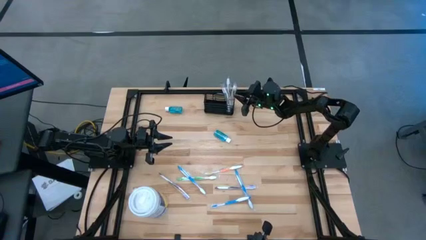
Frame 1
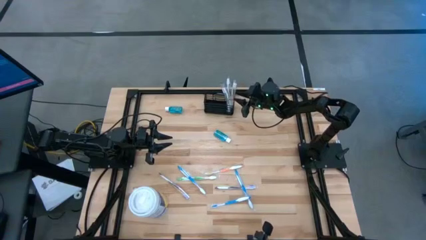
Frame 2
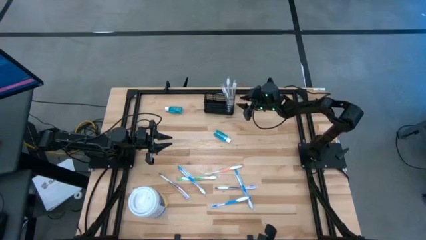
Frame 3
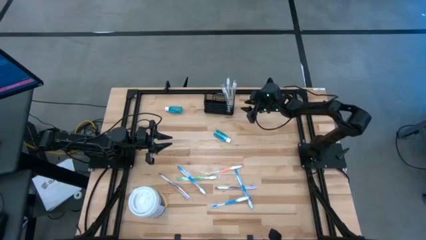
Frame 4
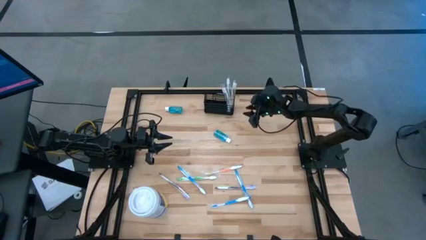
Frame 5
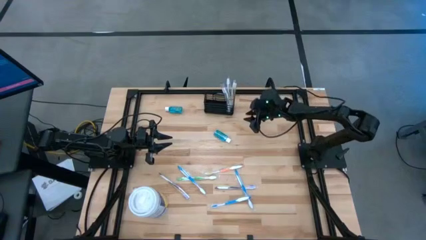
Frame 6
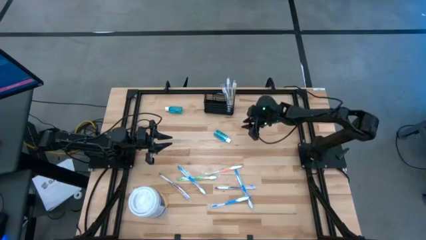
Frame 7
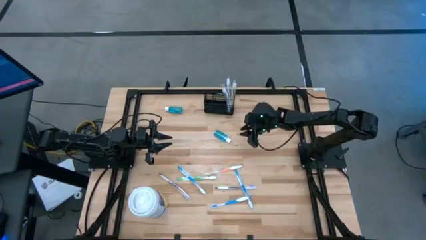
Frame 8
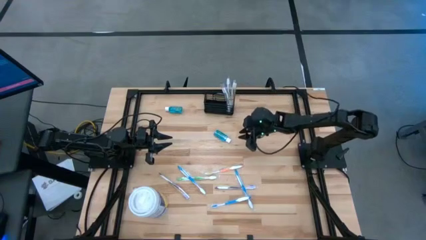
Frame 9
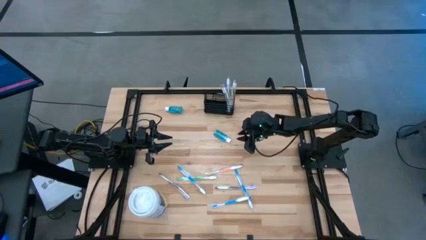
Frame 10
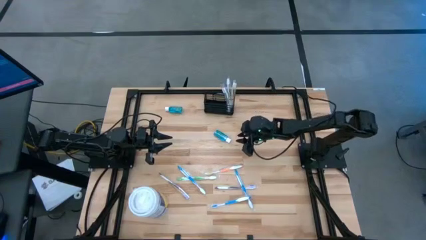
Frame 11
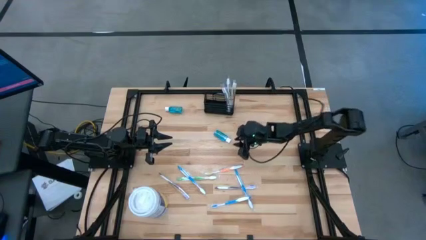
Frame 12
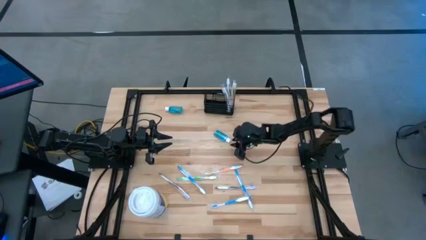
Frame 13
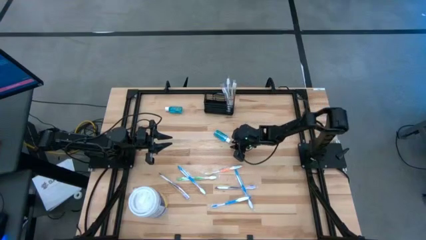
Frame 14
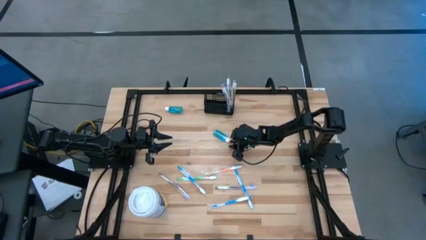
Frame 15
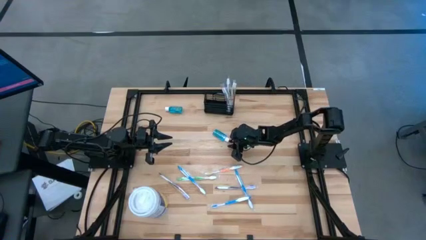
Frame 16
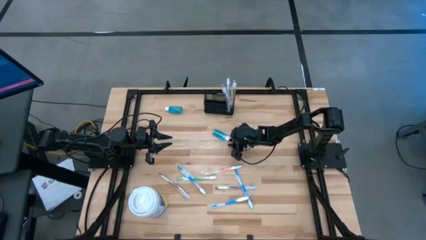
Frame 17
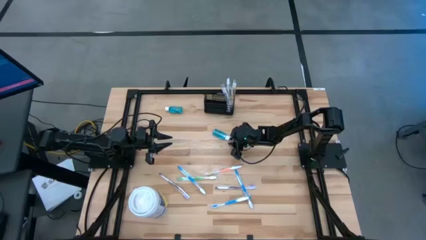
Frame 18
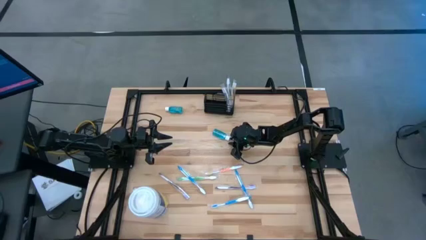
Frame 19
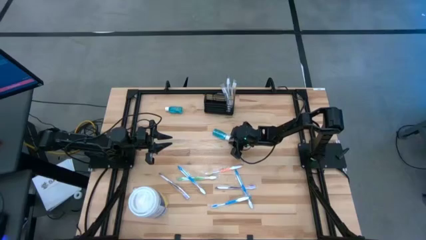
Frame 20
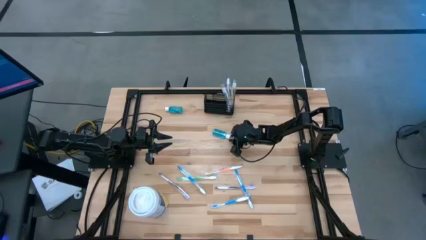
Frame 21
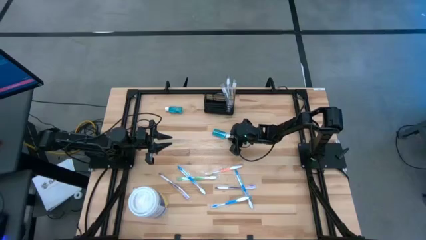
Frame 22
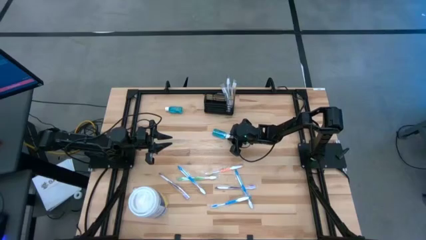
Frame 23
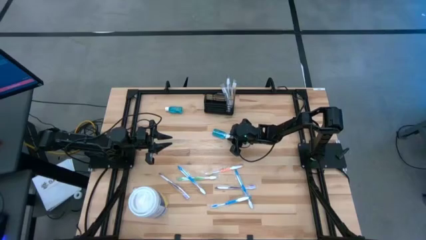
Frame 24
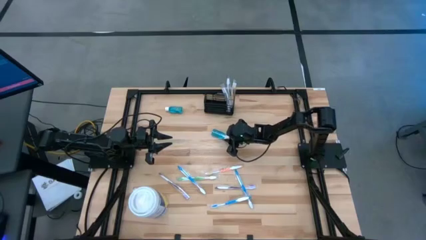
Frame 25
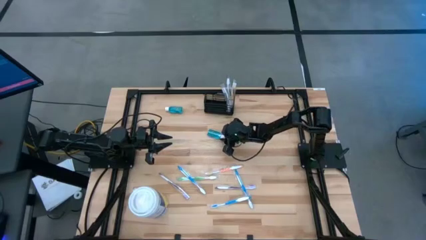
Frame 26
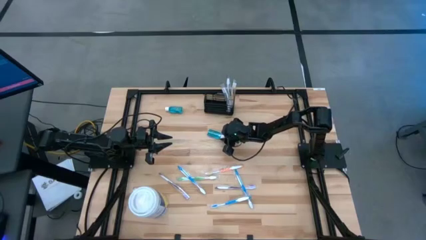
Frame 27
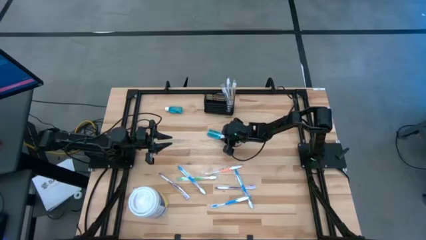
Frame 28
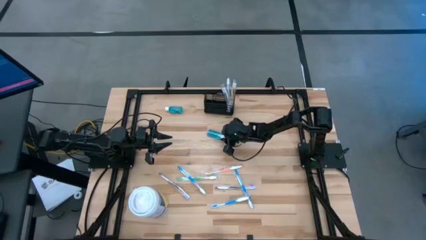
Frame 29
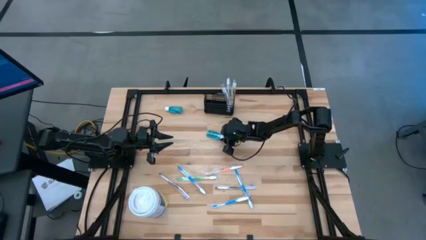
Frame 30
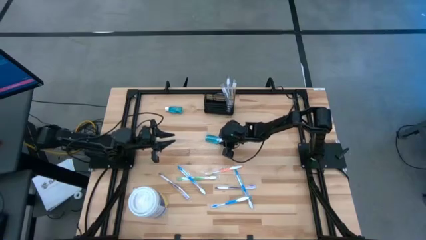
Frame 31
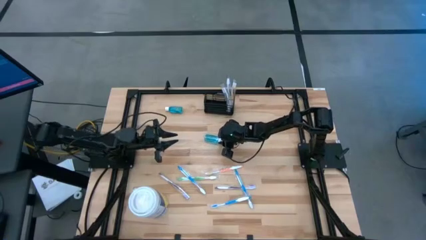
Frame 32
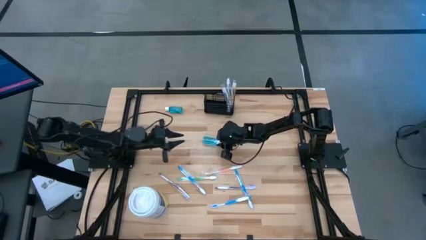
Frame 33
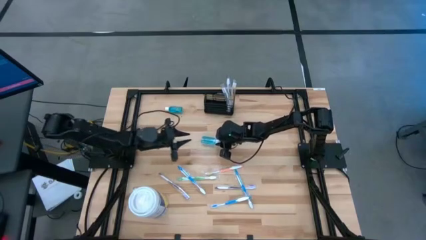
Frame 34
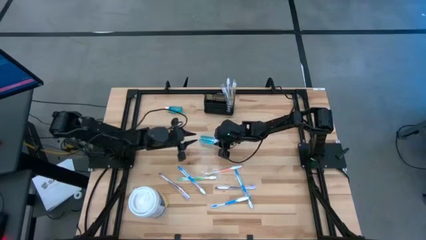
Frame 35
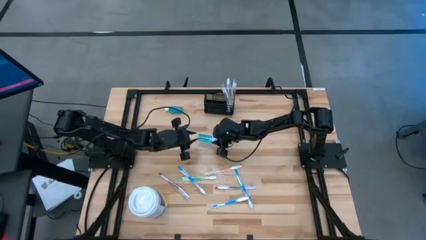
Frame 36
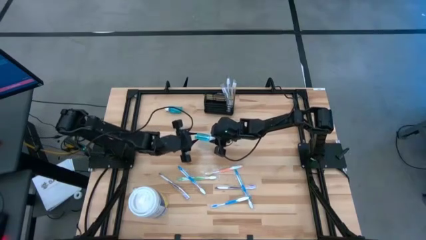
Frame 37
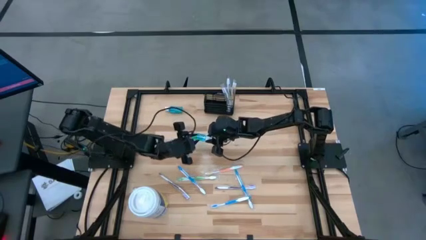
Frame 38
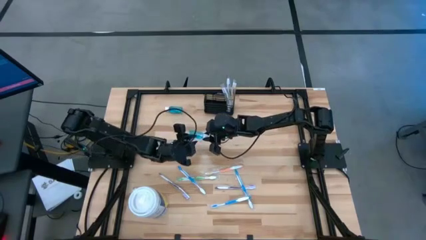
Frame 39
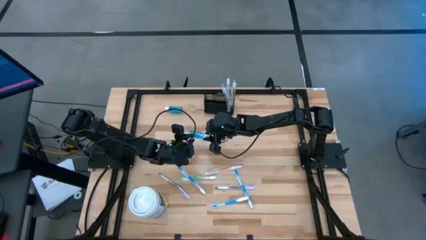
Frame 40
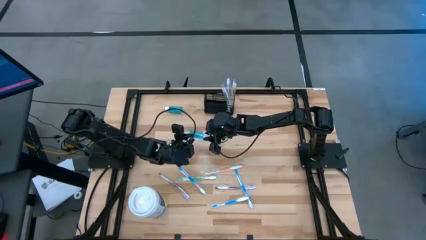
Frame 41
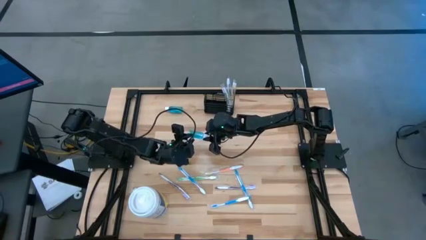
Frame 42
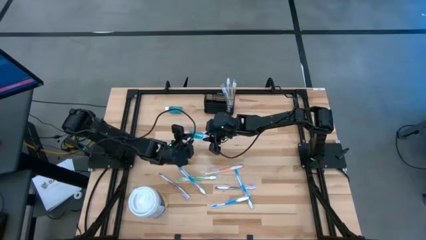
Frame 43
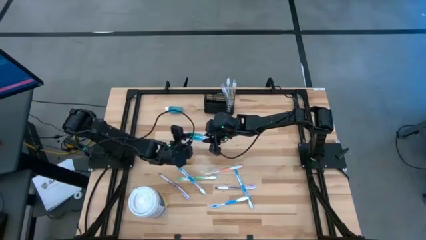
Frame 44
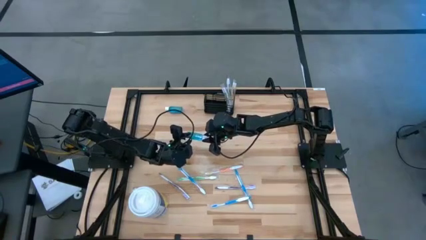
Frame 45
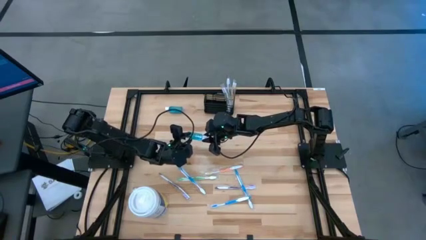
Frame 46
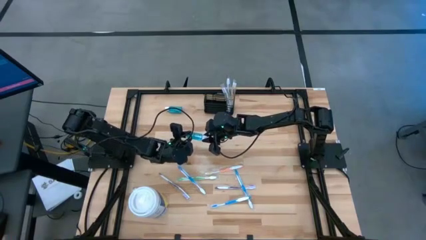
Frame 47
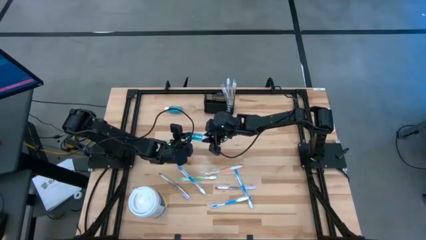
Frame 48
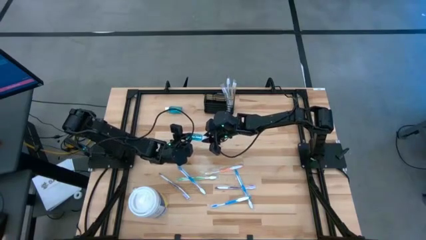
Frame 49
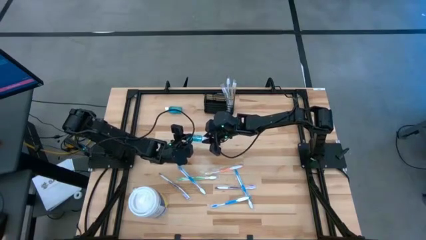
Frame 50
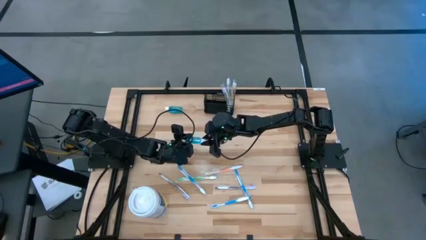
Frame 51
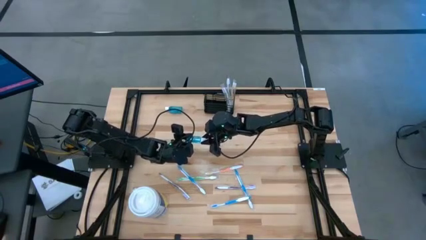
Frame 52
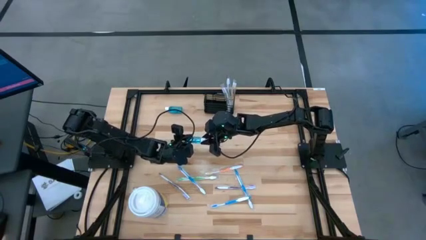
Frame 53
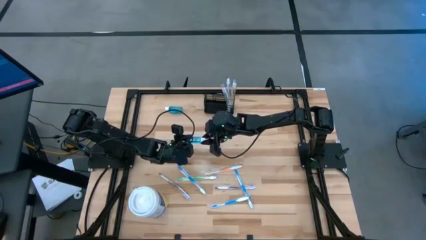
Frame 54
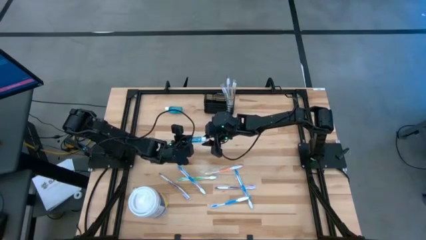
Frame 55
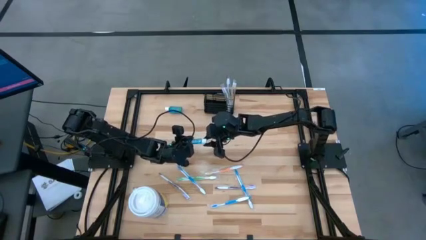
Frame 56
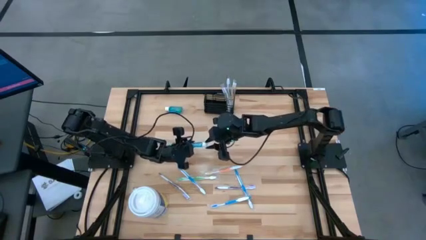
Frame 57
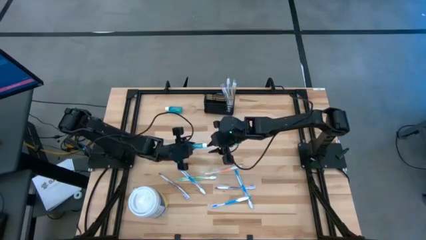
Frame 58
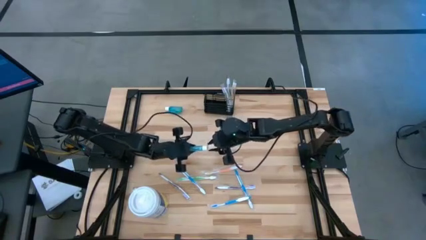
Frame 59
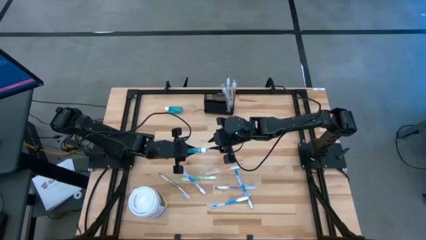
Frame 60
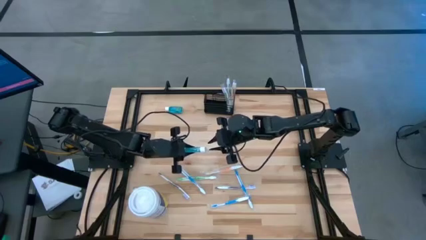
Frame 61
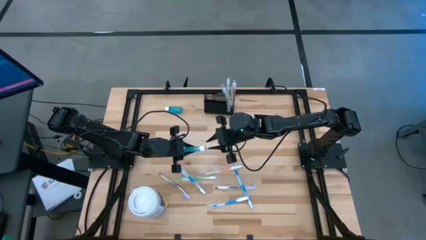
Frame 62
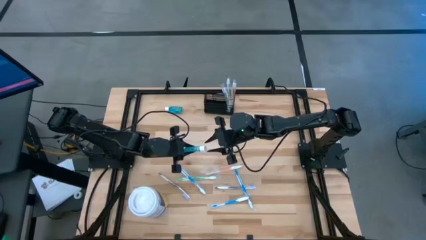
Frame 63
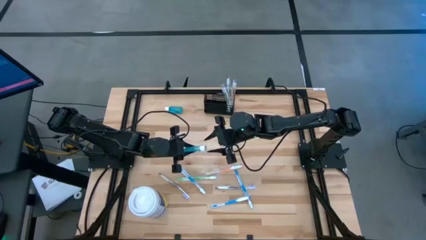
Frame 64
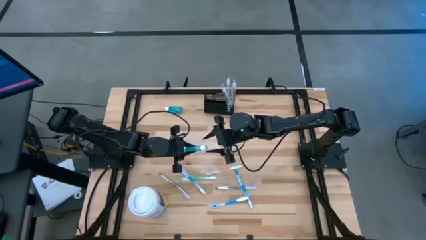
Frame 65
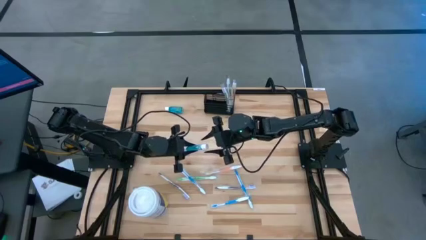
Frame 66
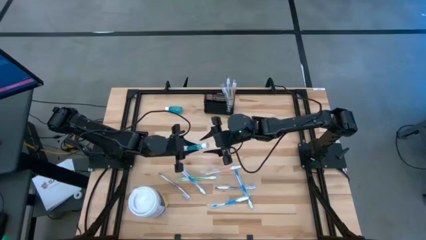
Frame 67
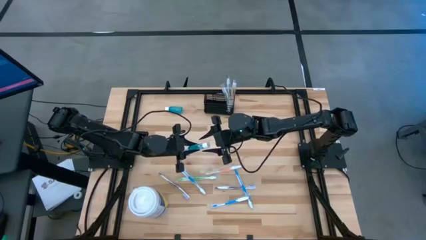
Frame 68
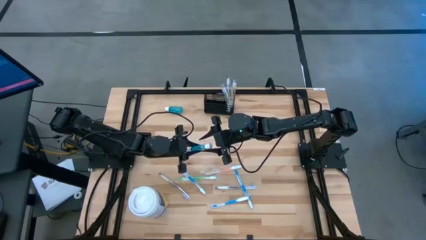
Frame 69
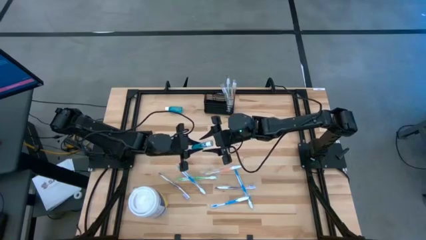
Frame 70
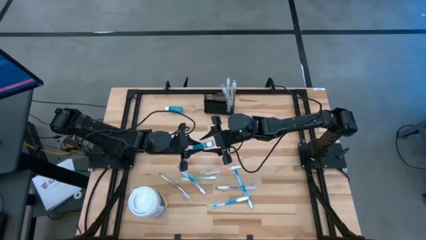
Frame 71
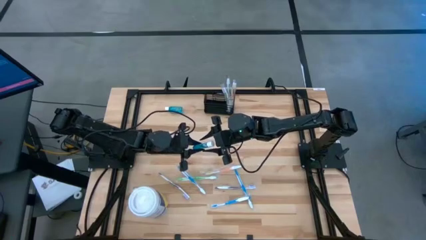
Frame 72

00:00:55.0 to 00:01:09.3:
Task: Pick & Place toothbrushing station
Put the bottom blue mouthwash into the mesh organizer
